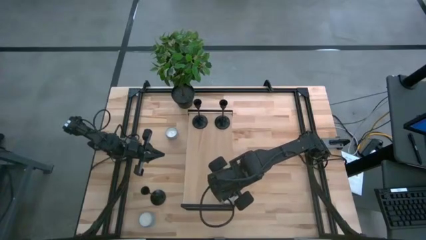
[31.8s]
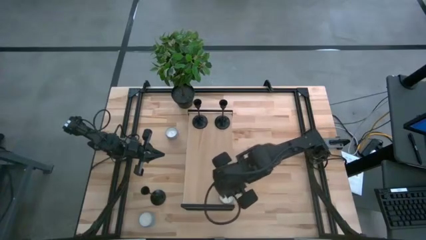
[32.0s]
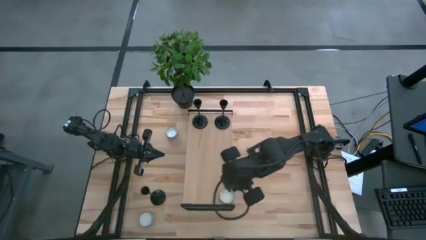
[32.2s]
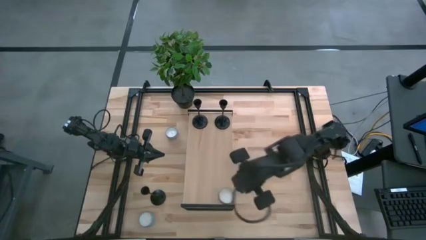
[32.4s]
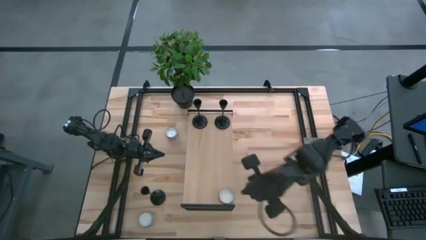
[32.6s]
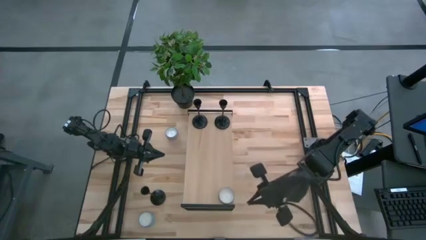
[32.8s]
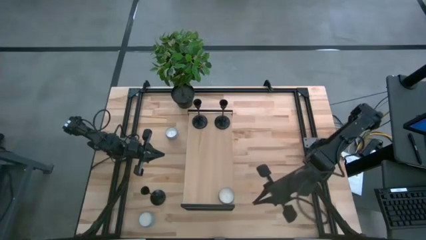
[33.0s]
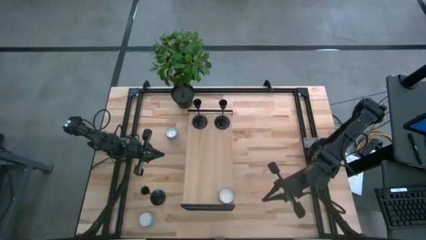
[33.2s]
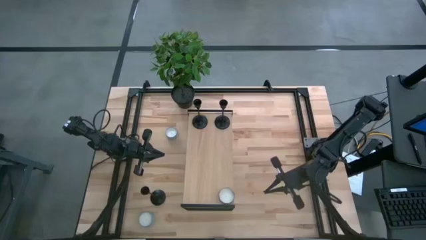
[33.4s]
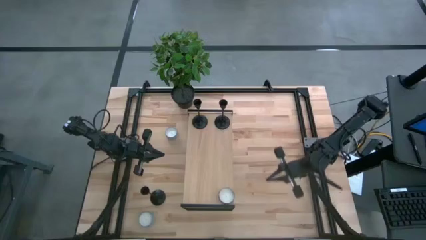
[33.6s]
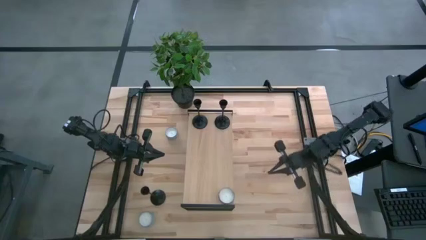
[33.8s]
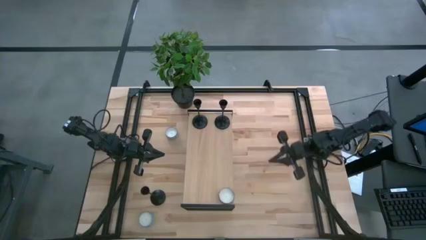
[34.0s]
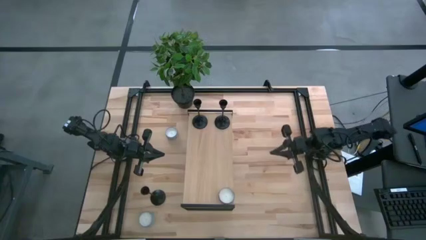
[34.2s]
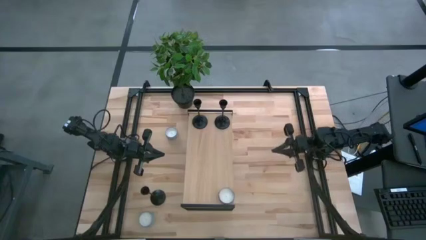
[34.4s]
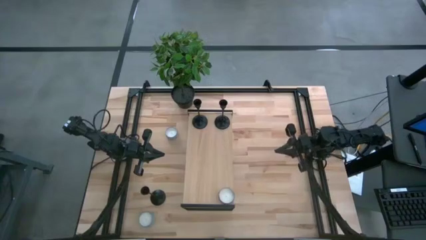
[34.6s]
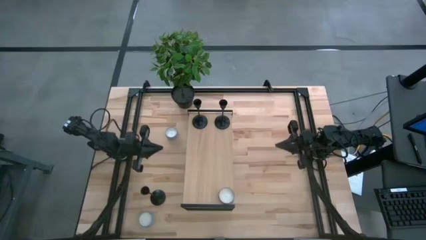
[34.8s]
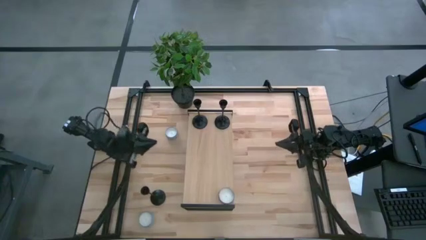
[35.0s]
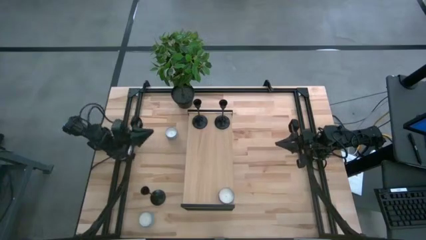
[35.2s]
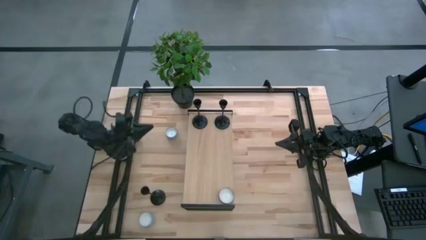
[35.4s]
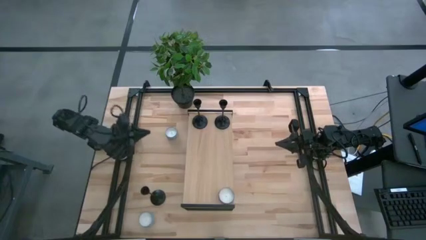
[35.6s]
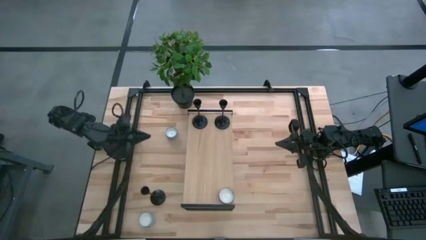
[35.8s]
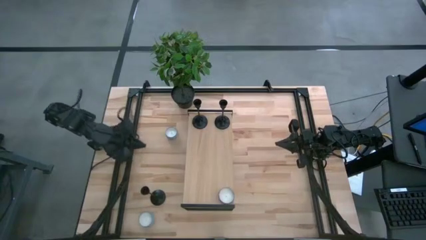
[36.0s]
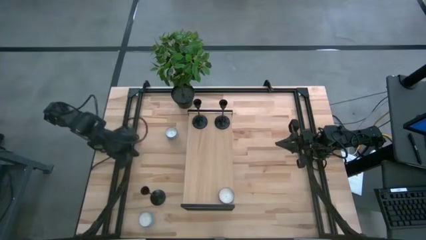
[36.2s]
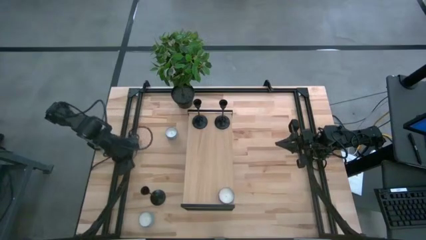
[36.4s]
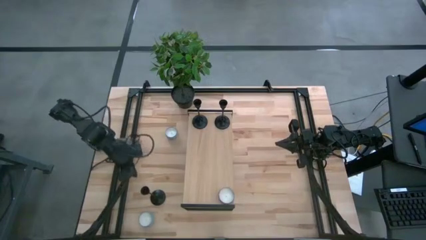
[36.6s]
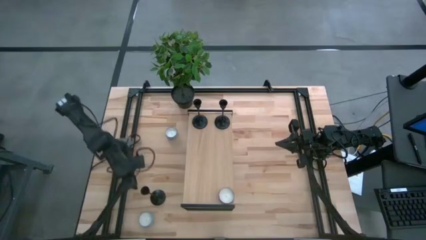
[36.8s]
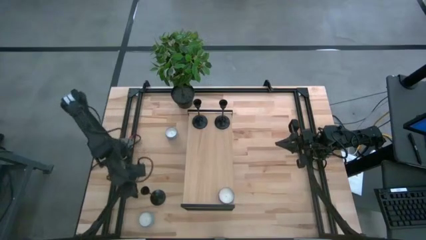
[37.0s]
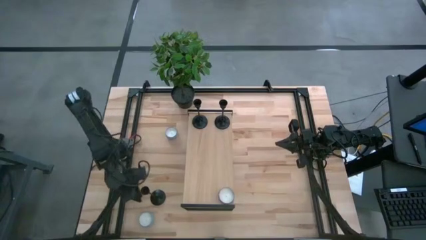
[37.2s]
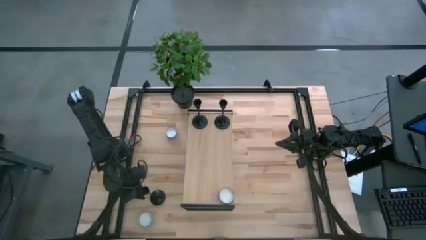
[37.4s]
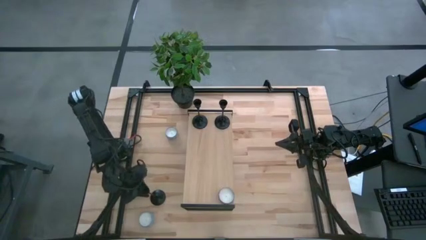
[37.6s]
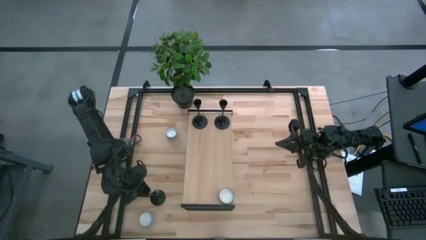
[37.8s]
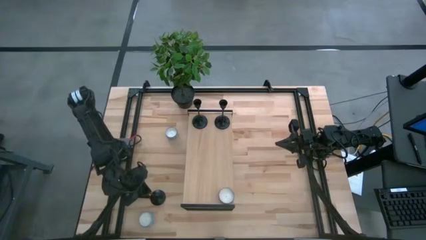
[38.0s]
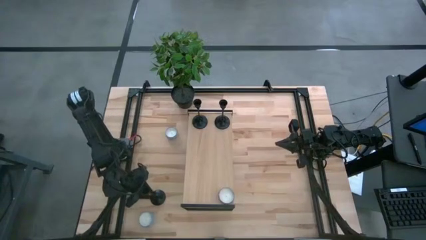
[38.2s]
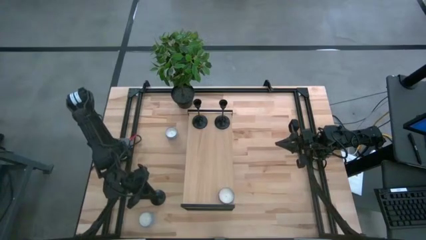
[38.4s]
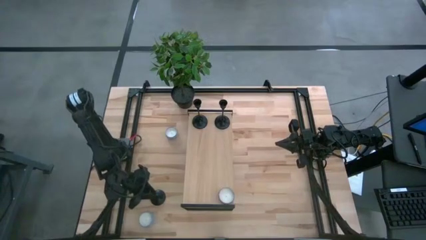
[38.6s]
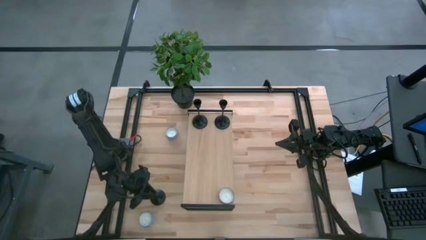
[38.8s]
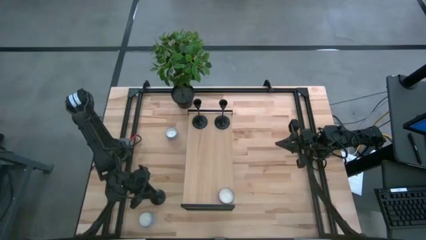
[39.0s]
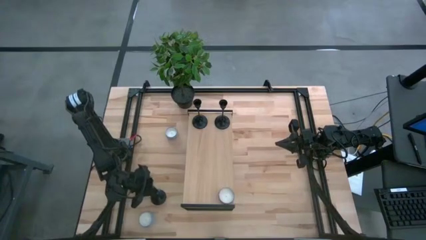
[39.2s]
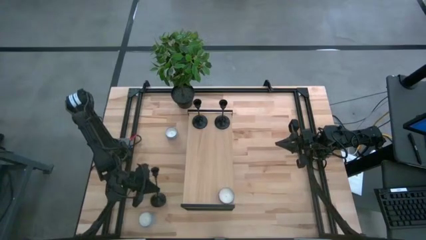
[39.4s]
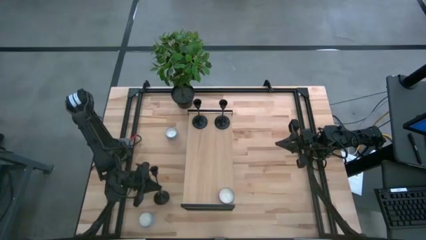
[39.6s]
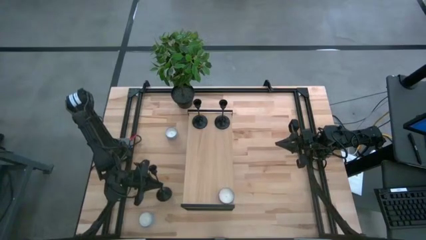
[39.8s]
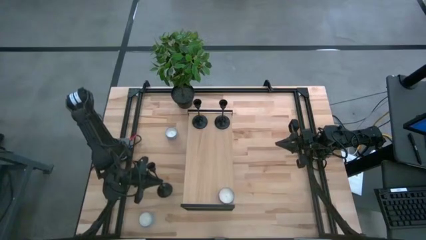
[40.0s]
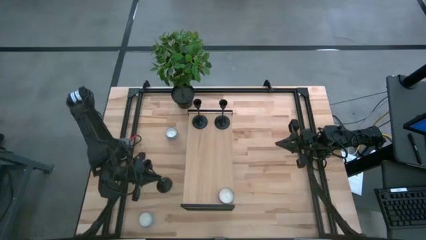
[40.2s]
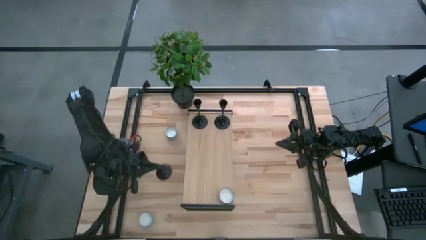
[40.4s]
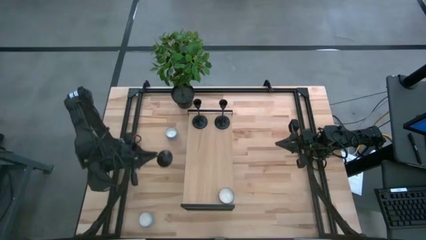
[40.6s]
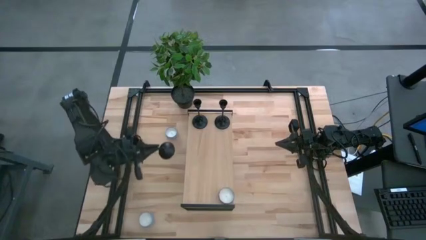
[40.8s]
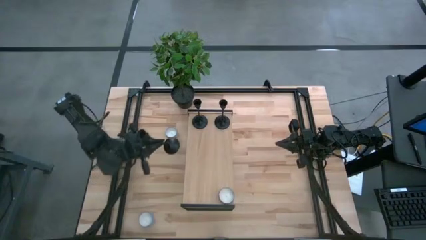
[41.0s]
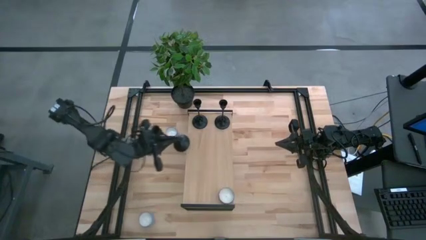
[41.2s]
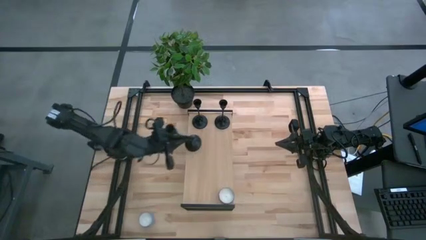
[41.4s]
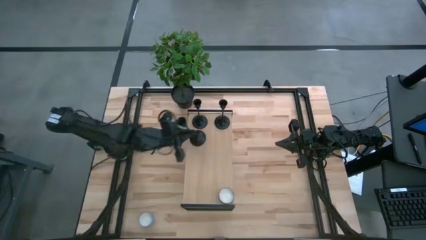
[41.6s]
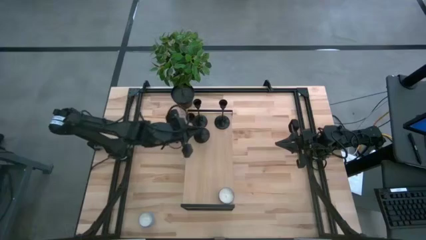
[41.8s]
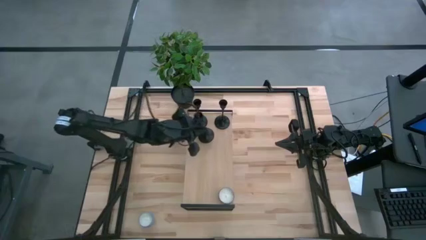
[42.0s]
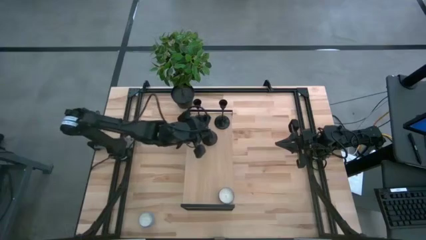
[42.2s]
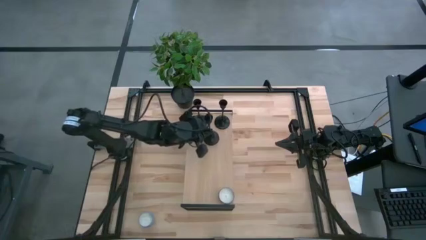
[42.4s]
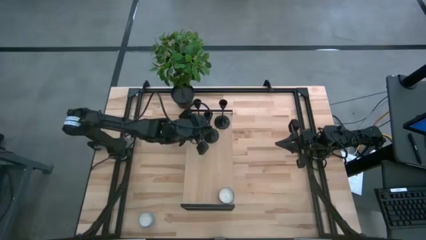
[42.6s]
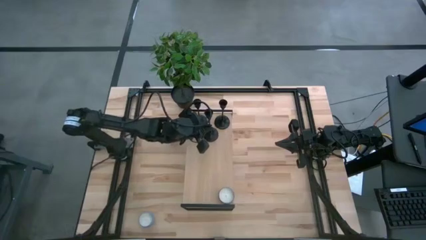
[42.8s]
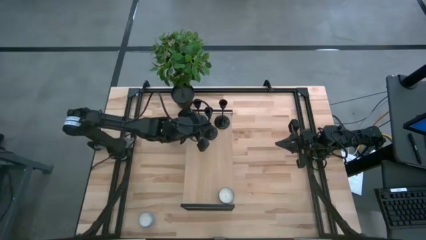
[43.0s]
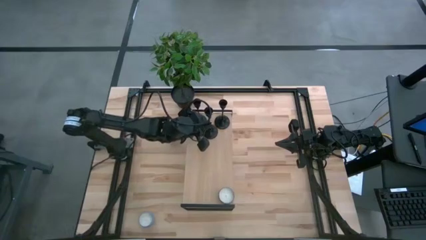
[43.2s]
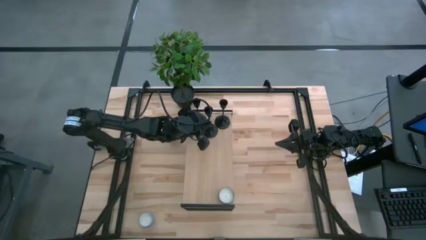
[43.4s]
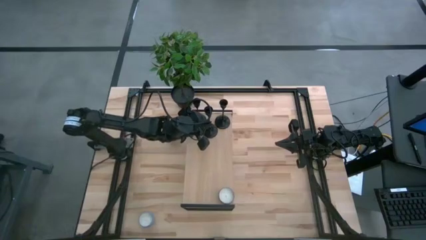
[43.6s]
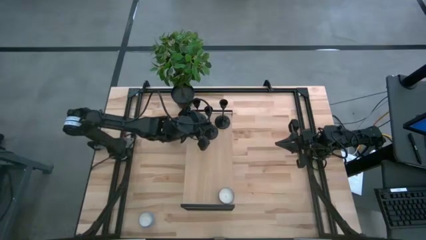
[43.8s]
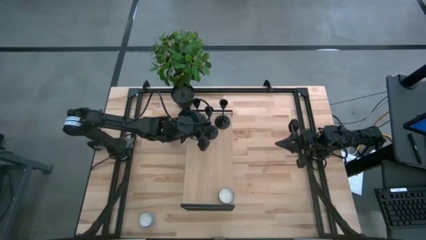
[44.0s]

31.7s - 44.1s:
Task: Pick & Place candle stick holders
Put the black candle holder on the shelf

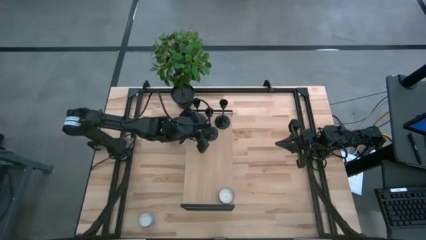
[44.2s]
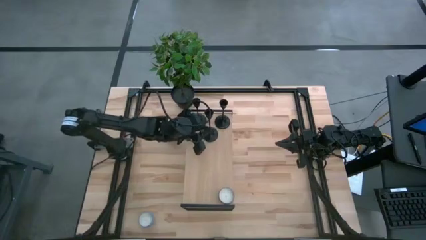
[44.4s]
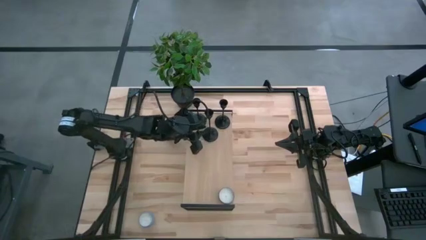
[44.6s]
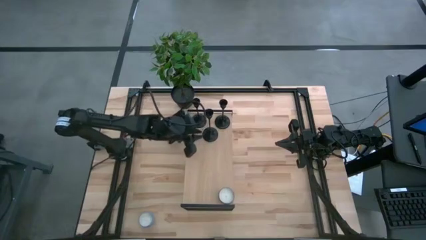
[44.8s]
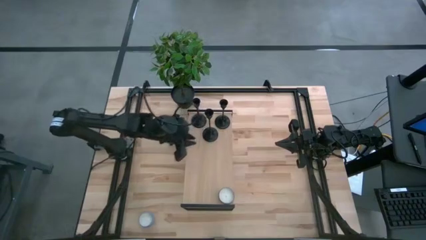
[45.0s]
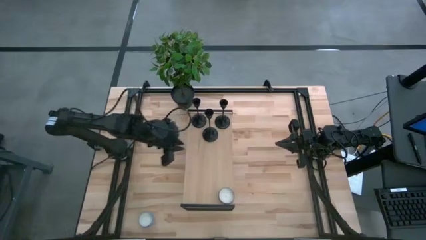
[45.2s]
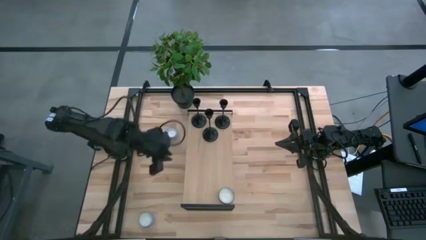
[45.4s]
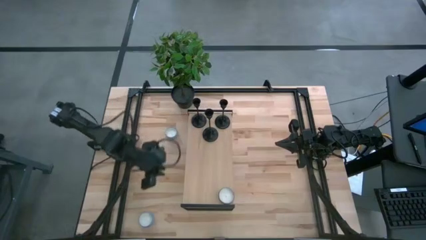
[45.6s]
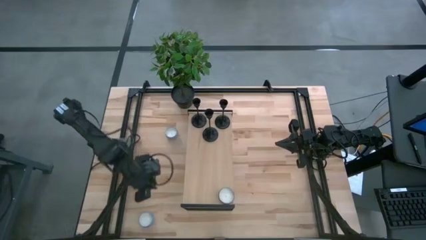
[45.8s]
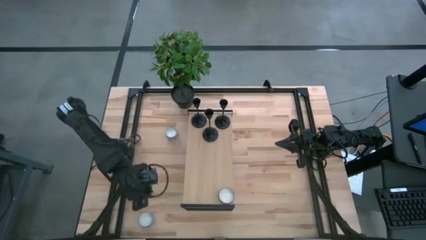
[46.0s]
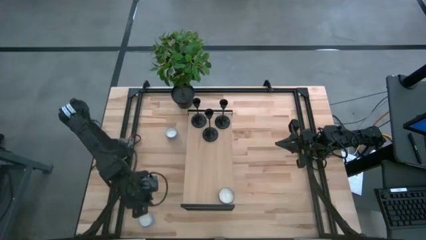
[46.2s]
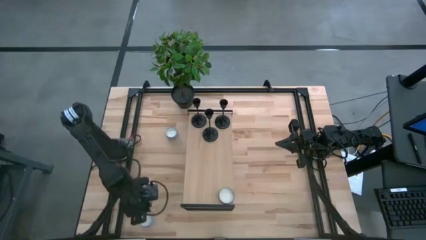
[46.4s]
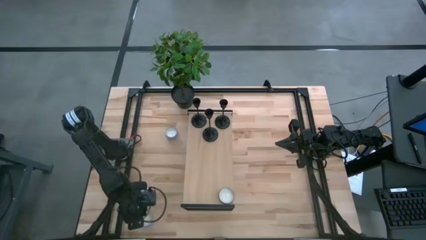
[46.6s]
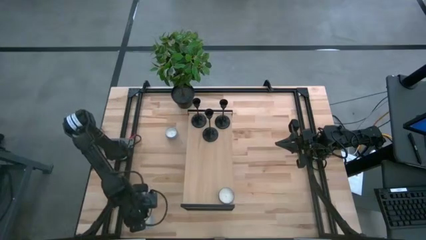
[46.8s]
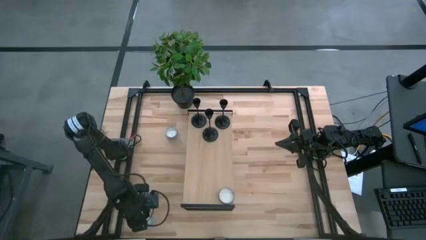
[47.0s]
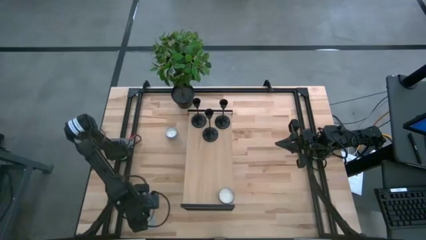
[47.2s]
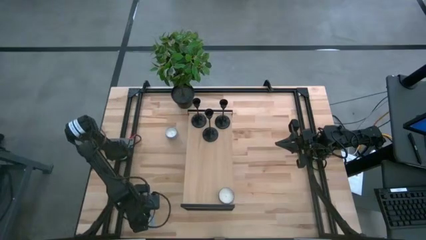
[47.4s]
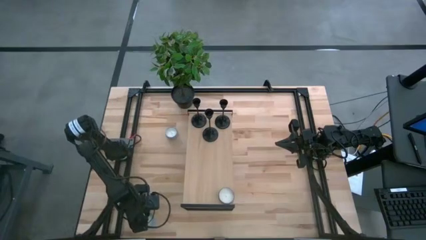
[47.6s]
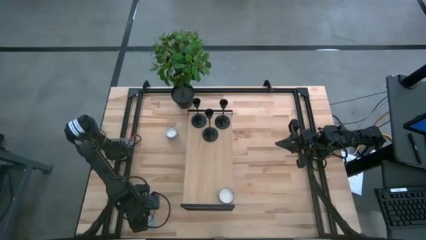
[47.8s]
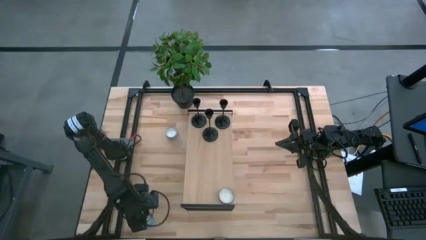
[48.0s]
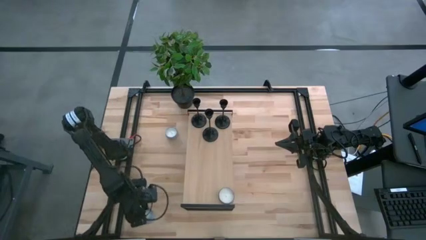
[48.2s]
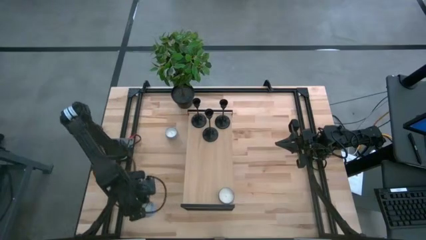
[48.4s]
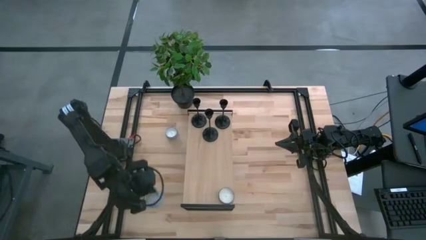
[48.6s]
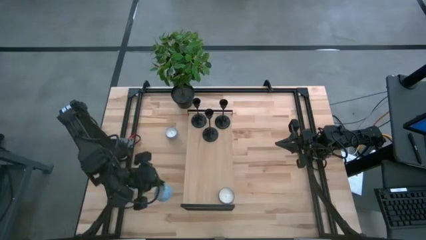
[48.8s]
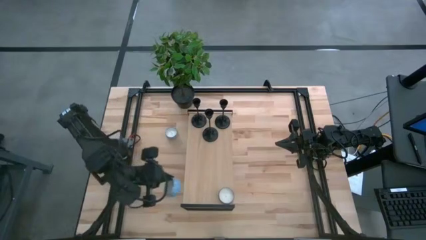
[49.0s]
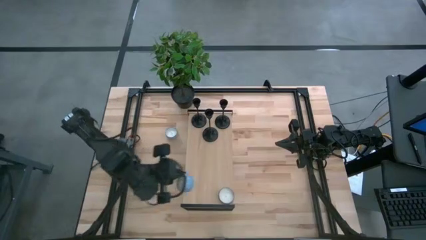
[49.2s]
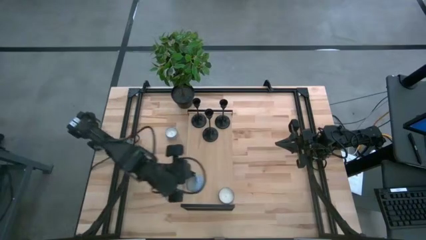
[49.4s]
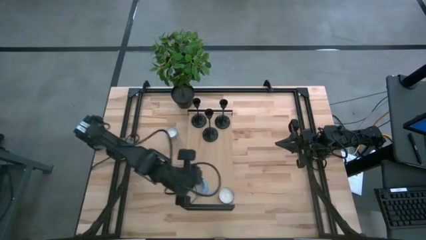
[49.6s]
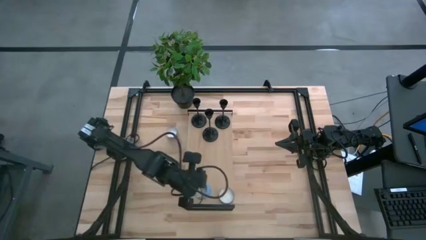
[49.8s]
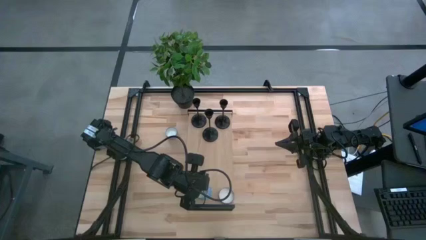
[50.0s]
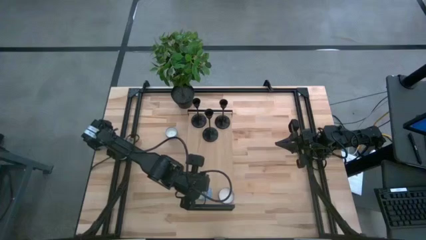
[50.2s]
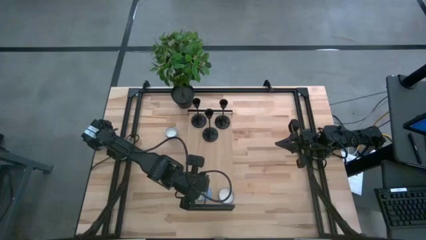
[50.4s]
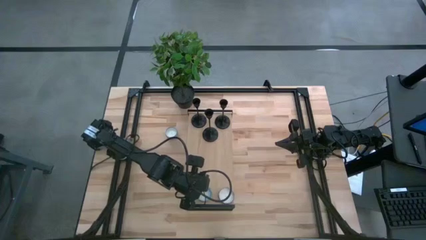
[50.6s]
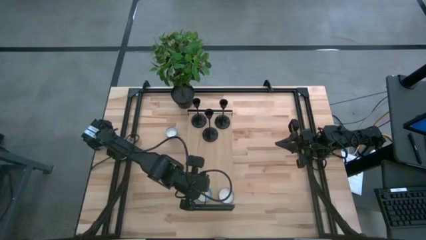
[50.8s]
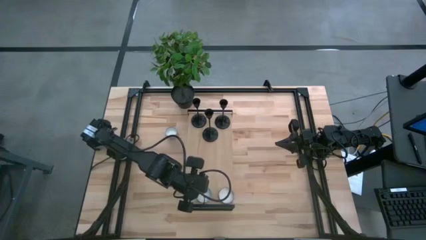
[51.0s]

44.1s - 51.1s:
Put the blue scented candle on the shelf aligned with the pink scented candle
